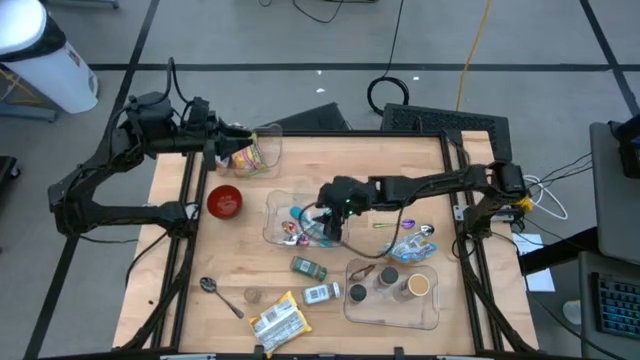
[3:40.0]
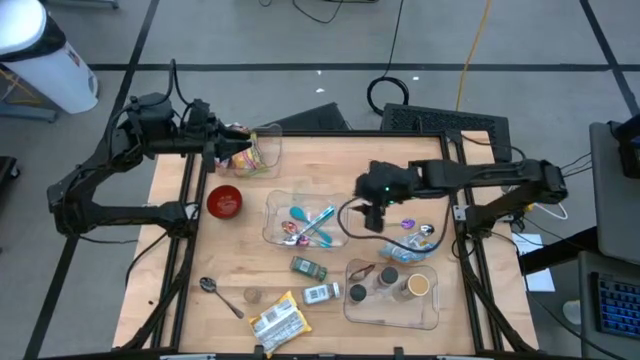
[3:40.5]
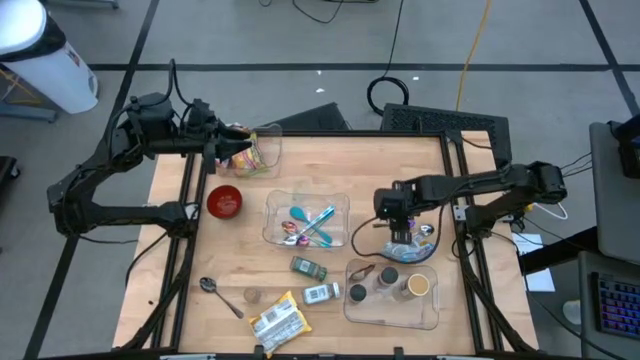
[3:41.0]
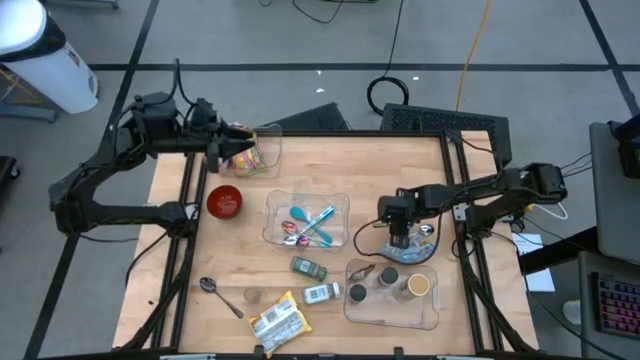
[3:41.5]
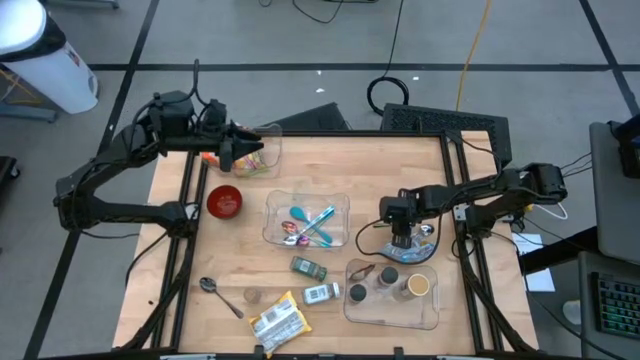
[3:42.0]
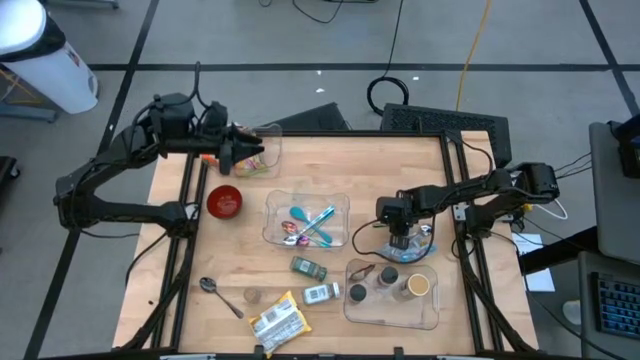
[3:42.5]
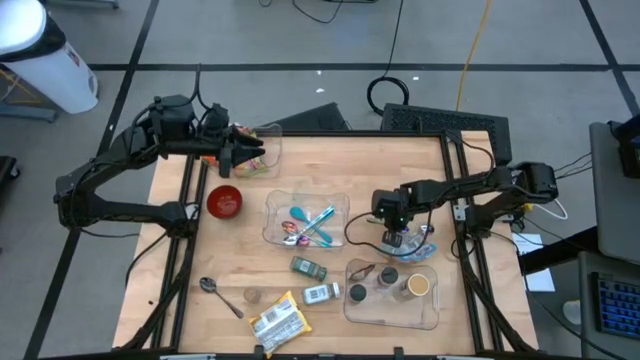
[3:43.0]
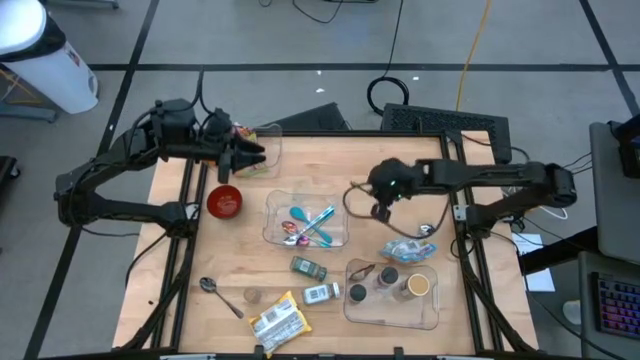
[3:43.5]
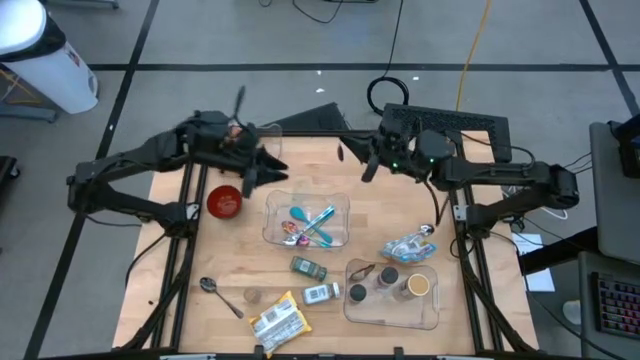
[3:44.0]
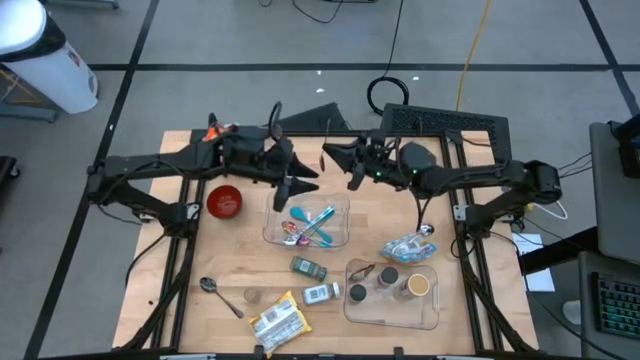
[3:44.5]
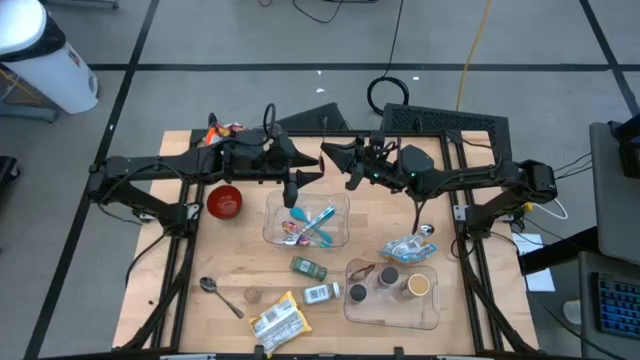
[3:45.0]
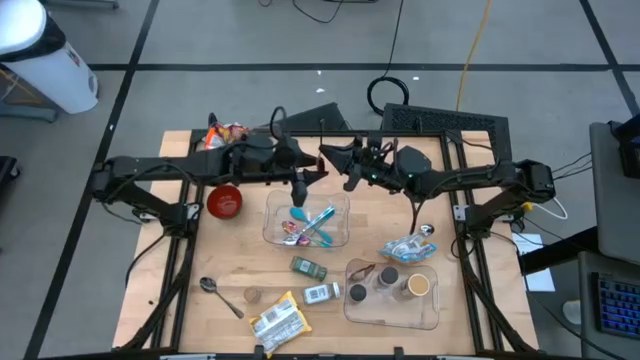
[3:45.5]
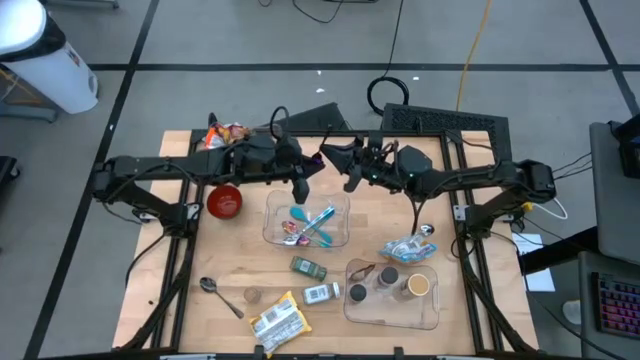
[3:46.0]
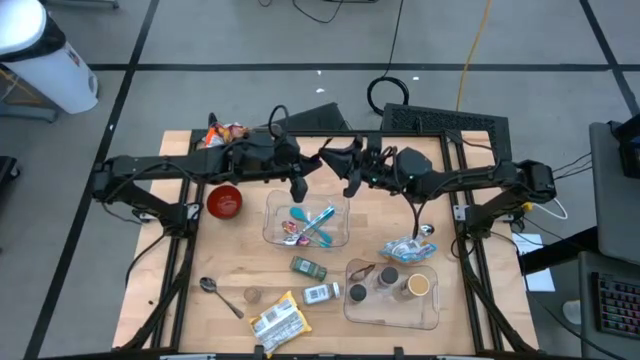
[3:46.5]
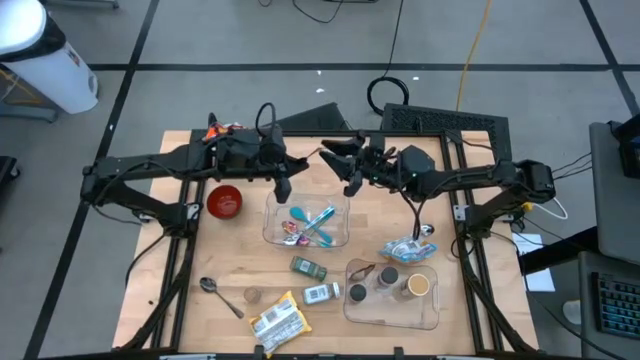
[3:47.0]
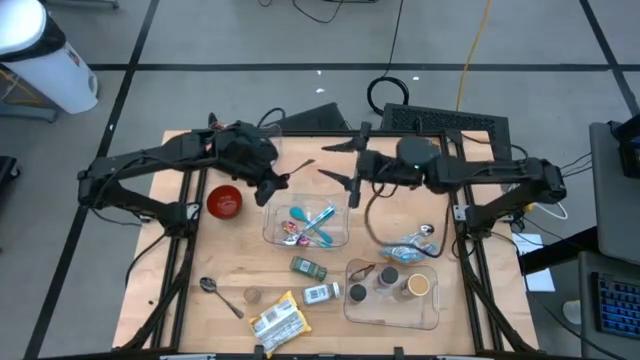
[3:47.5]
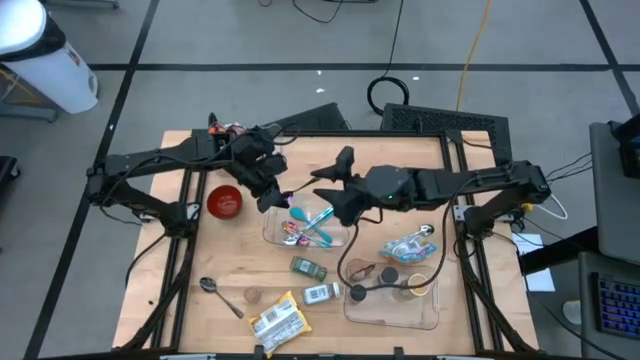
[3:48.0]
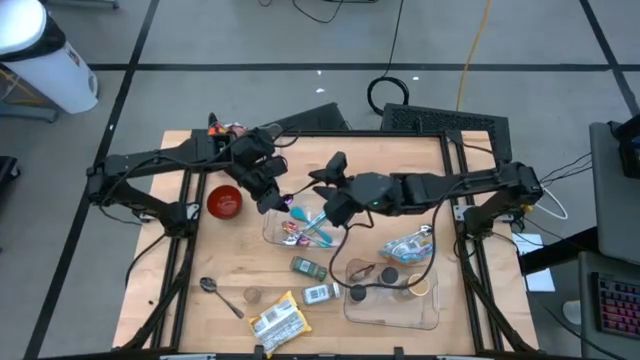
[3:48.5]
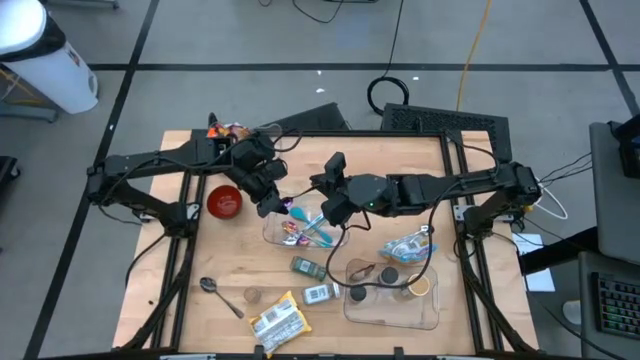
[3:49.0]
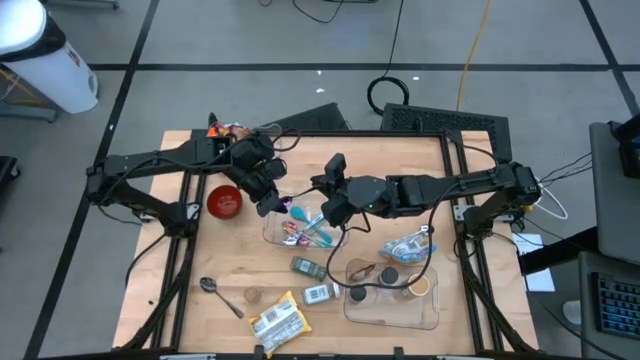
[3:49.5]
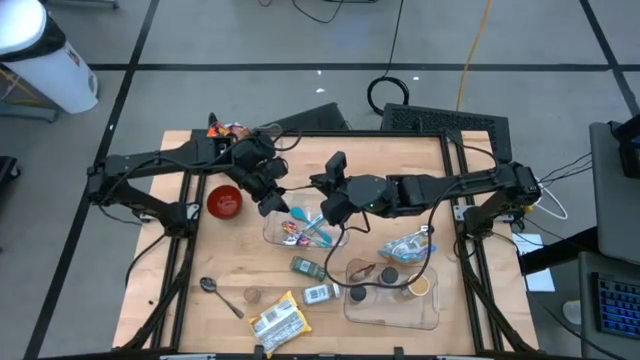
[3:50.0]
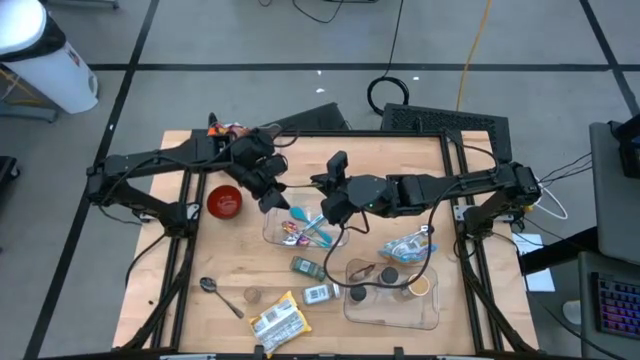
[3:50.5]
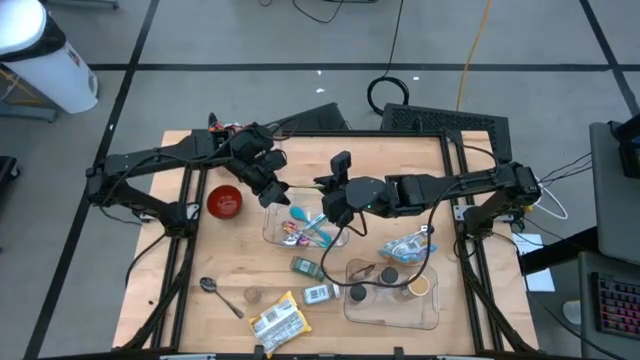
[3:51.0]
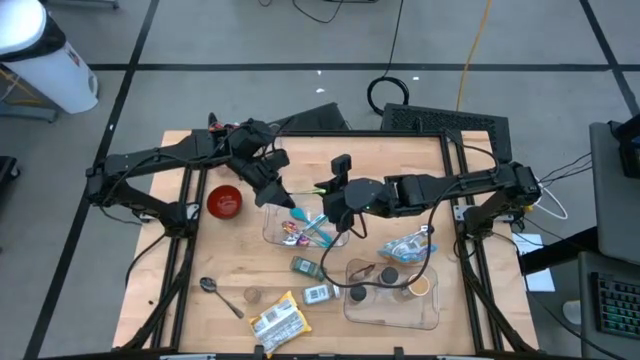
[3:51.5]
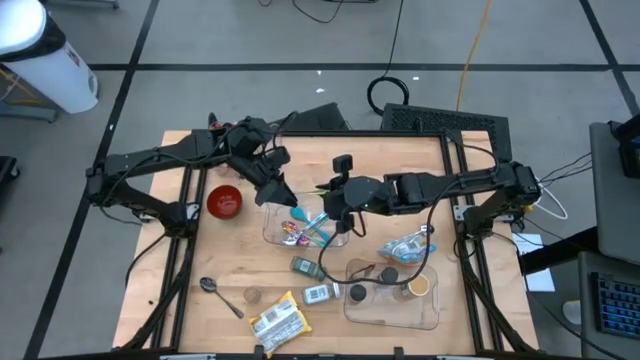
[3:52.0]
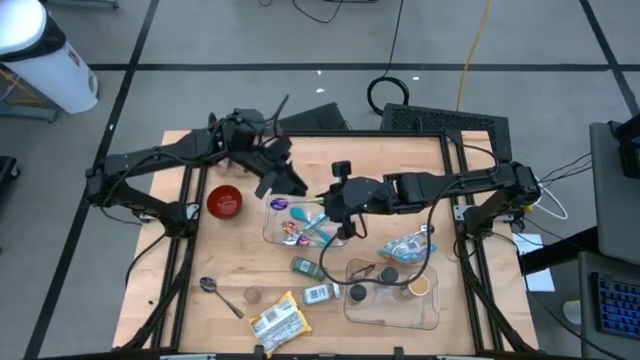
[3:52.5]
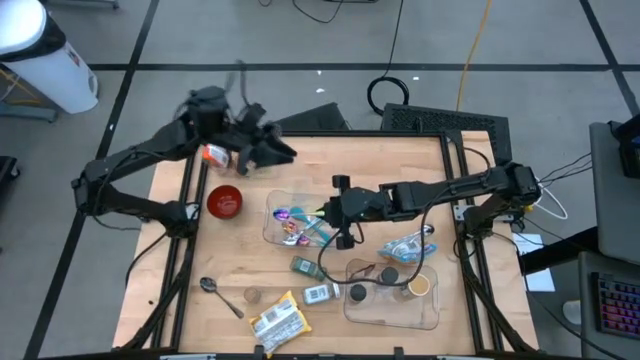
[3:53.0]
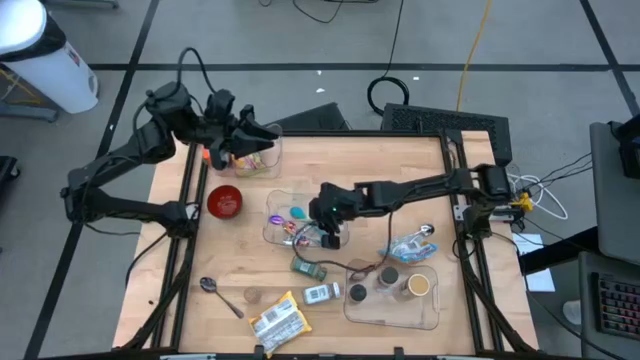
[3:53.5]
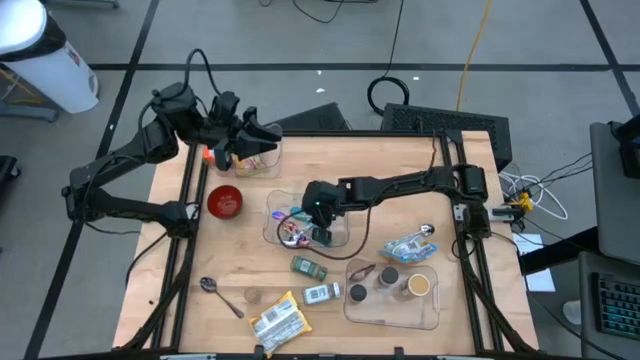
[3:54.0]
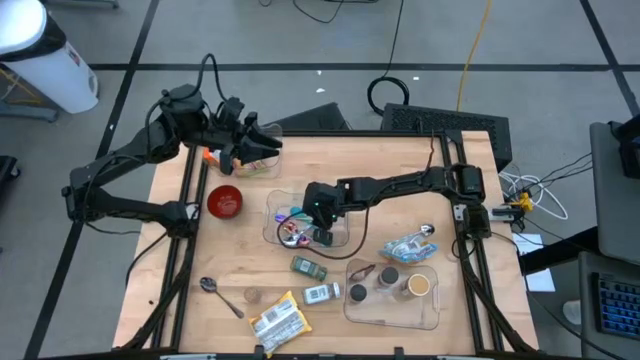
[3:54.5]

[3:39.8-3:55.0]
Task: Pick & Place Food Item
Put the blue spoon into the middle transparent bin

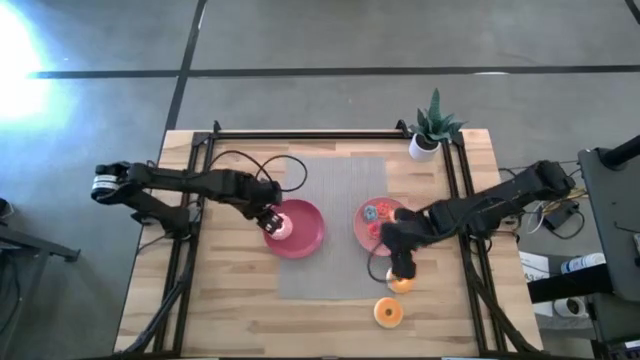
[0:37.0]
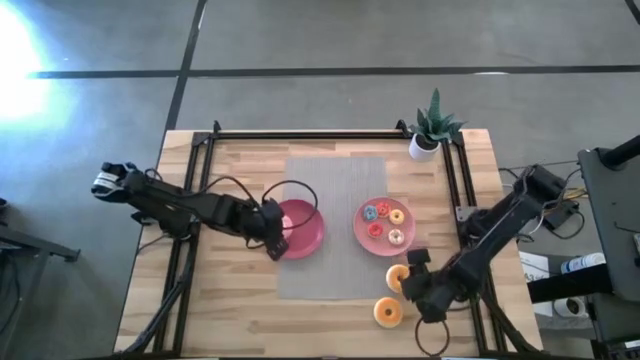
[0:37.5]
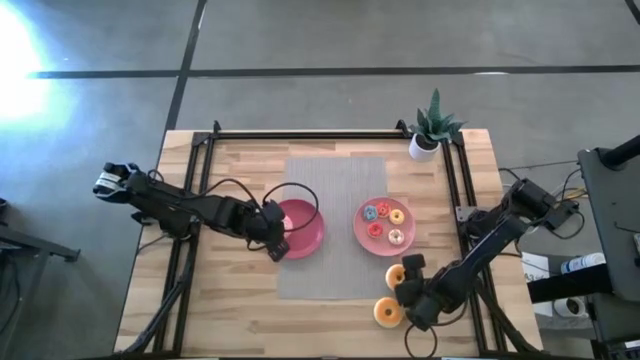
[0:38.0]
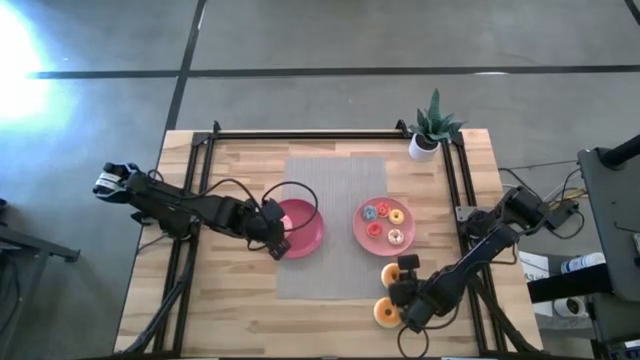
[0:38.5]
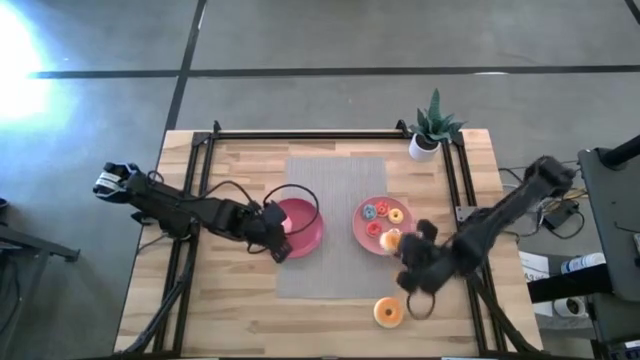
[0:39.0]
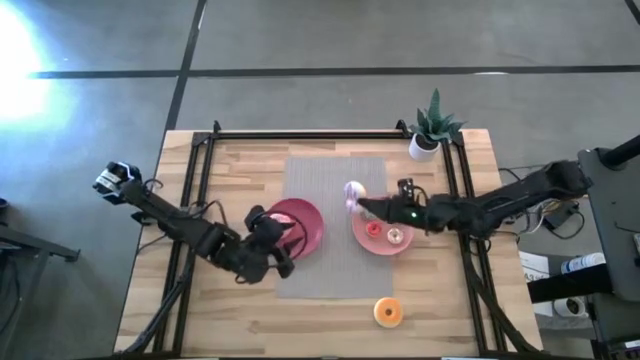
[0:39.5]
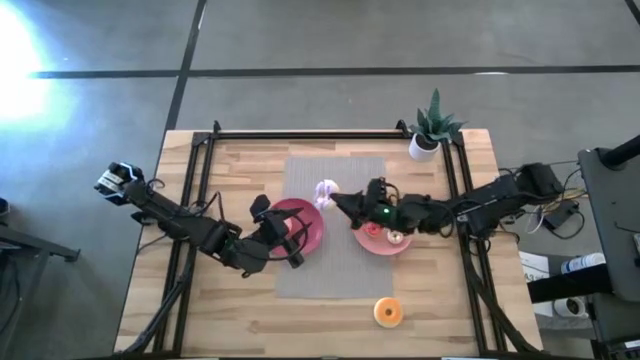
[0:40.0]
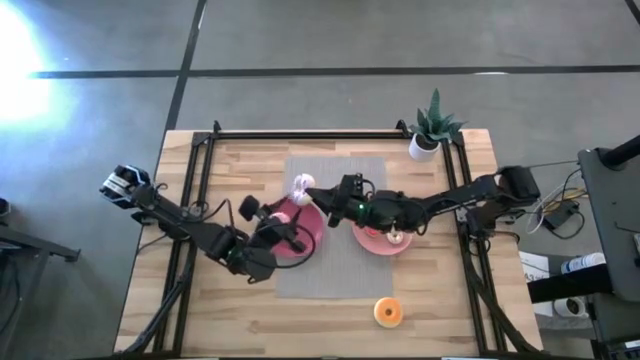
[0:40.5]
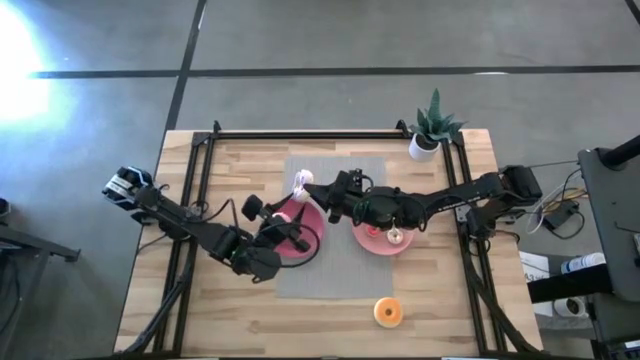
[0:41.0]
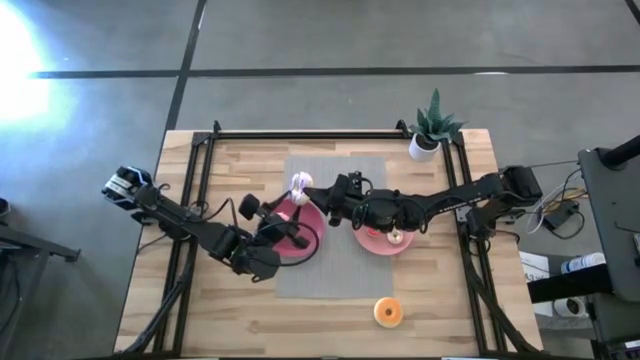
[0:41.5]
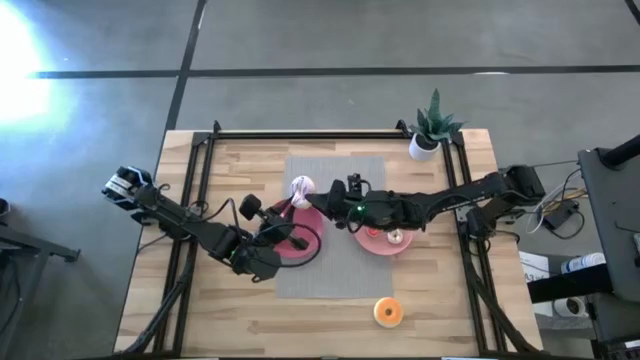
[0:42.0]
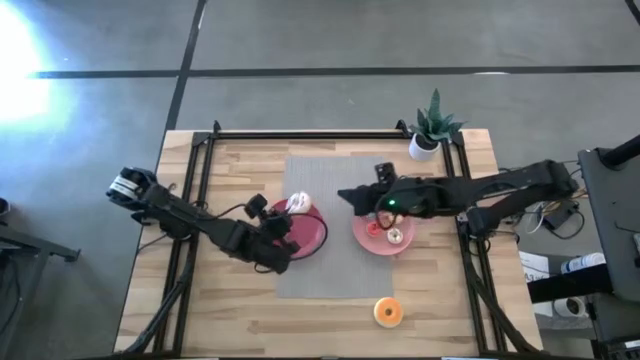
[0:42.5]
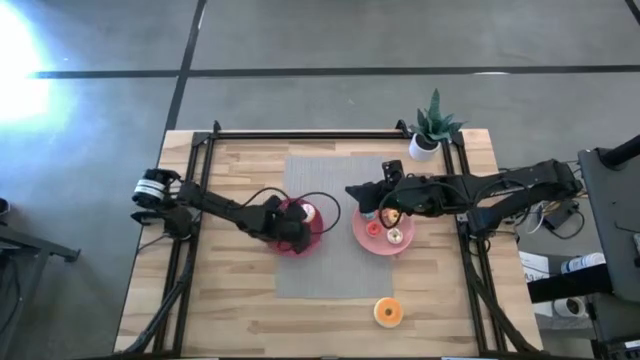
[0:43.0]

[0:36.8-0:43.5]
Task: Pick & Place donuts
Put the large purple donut on the pink plate
